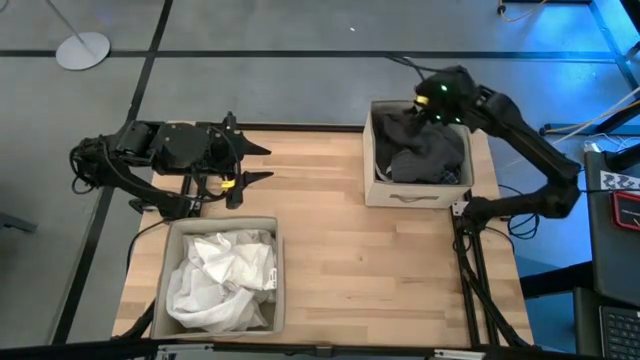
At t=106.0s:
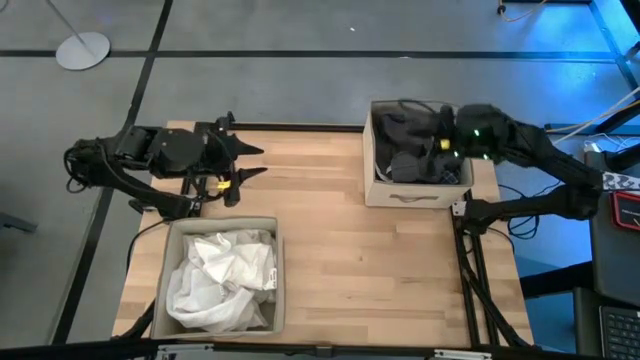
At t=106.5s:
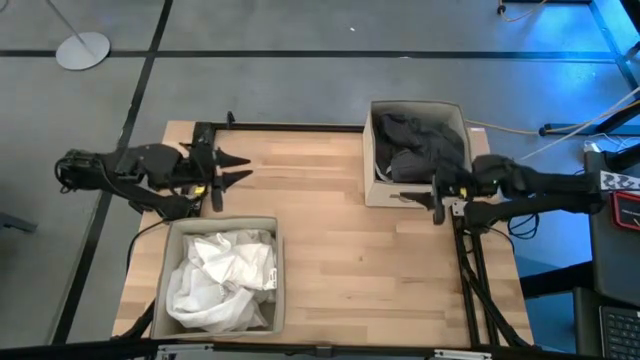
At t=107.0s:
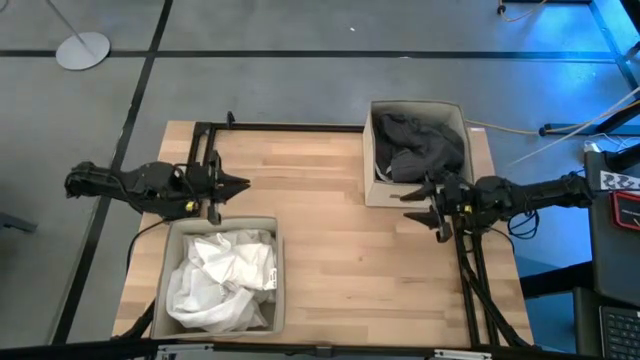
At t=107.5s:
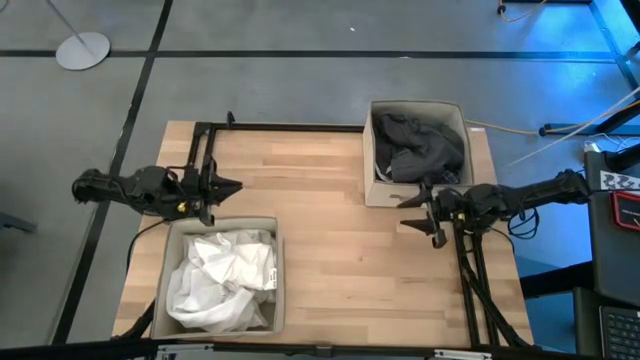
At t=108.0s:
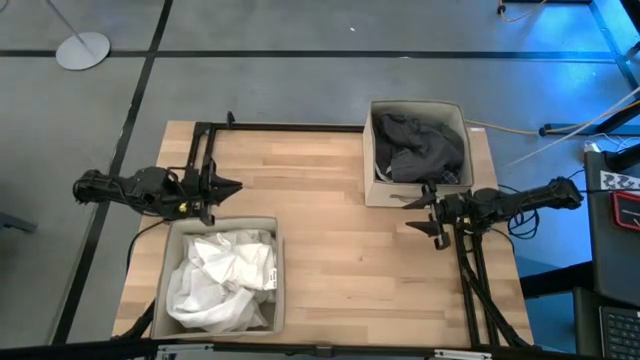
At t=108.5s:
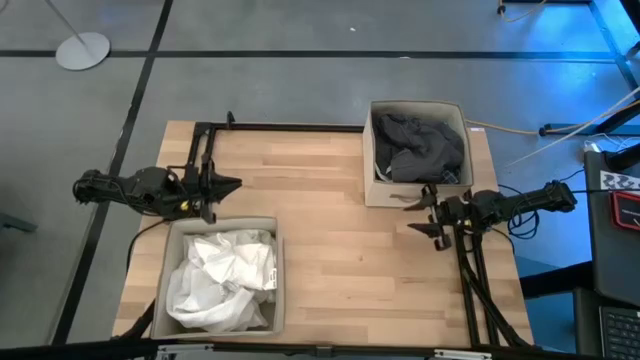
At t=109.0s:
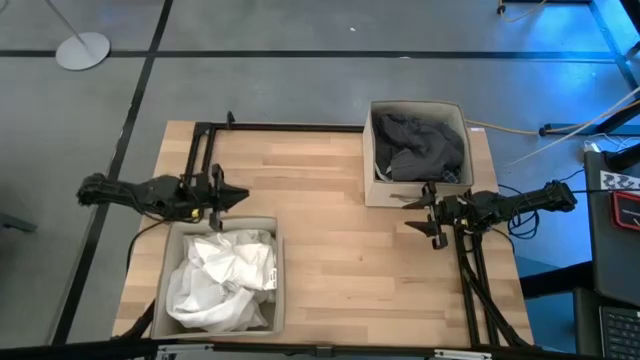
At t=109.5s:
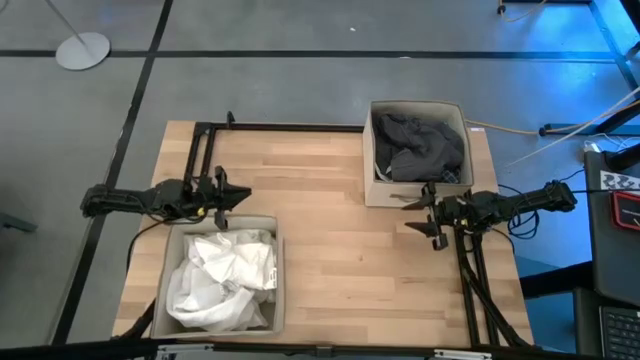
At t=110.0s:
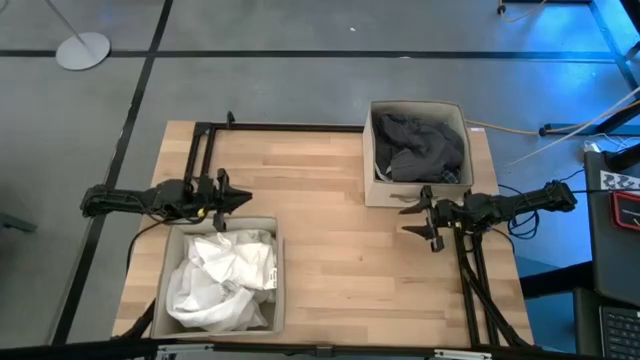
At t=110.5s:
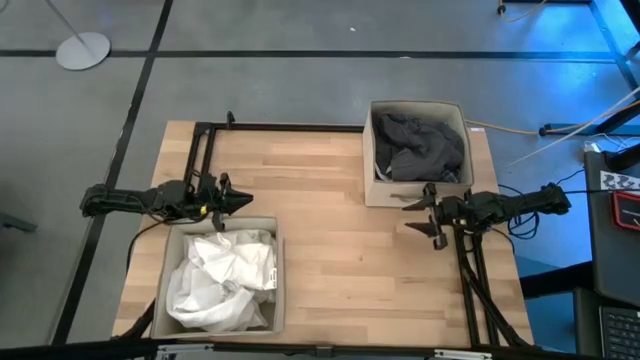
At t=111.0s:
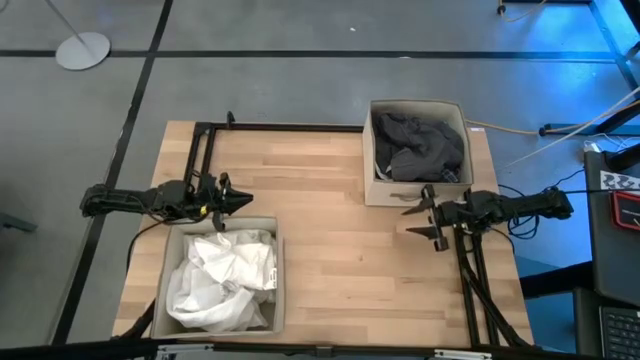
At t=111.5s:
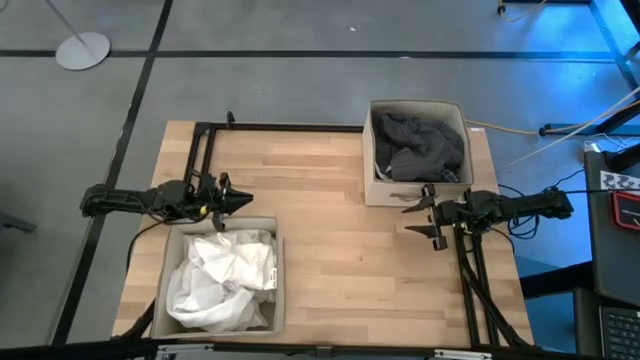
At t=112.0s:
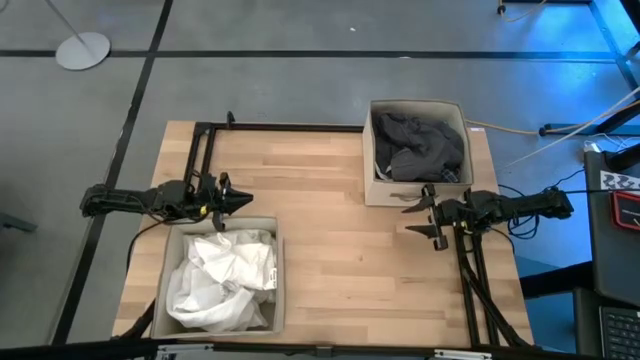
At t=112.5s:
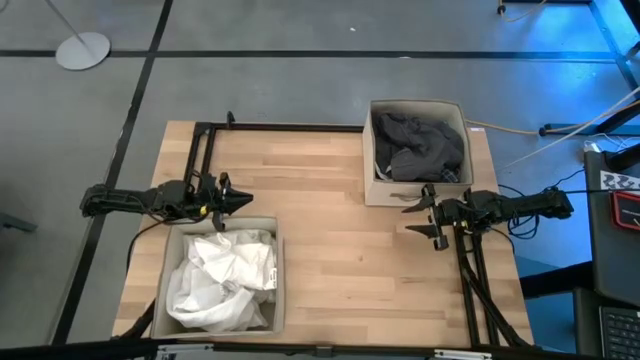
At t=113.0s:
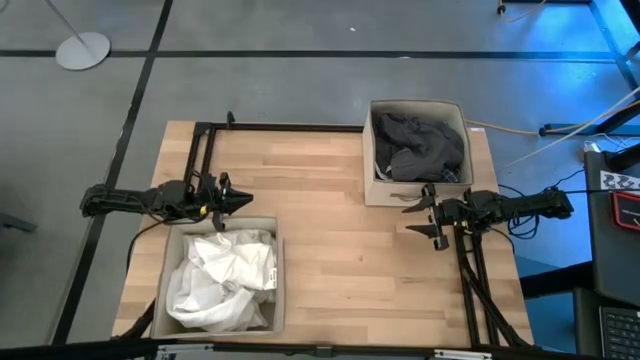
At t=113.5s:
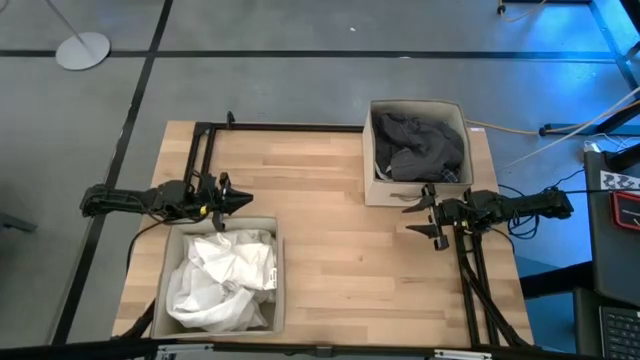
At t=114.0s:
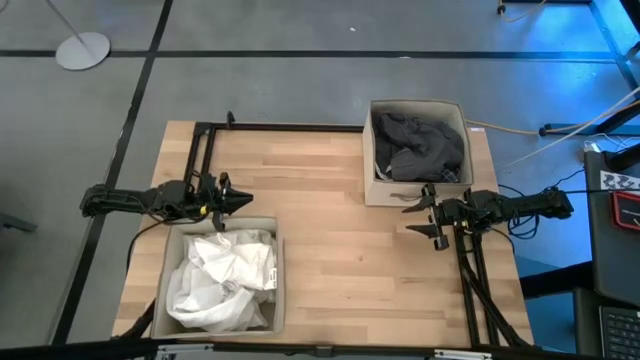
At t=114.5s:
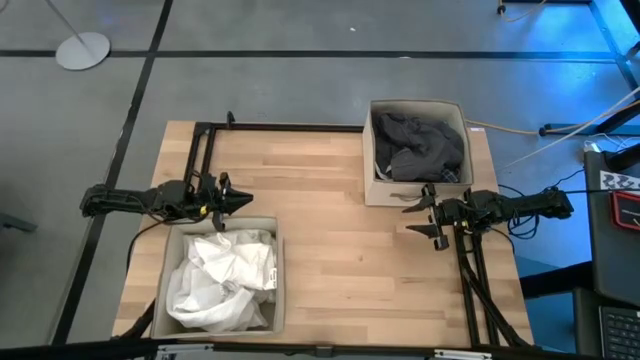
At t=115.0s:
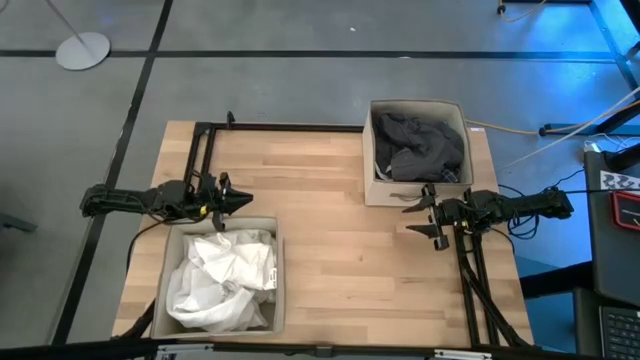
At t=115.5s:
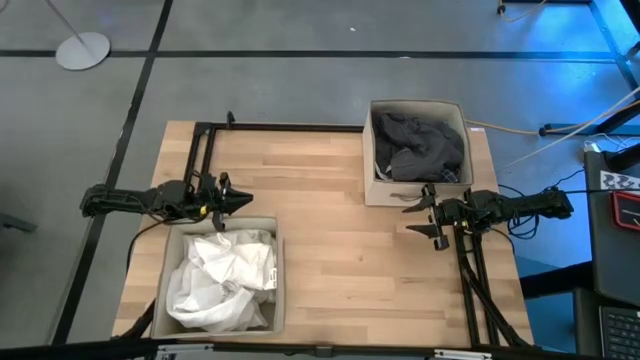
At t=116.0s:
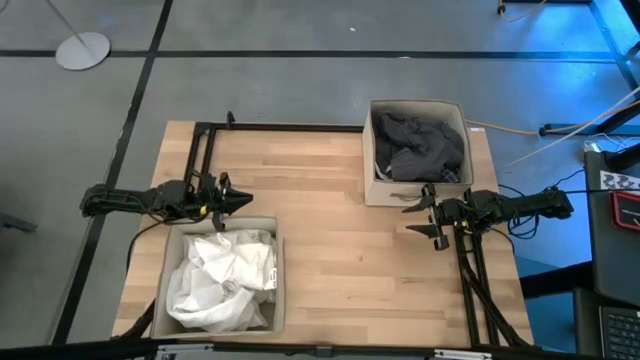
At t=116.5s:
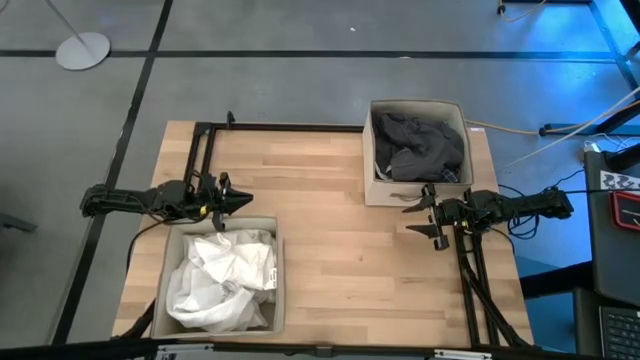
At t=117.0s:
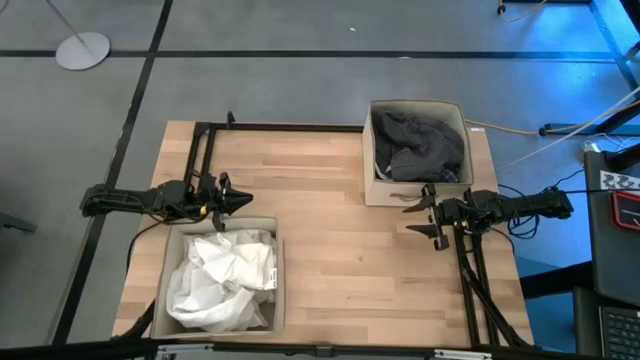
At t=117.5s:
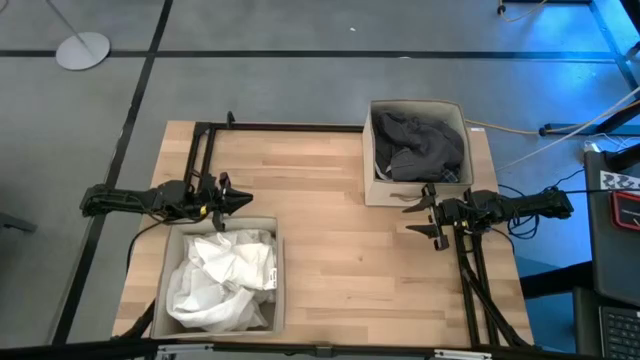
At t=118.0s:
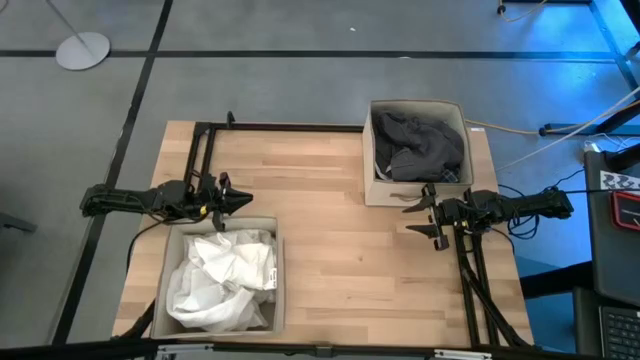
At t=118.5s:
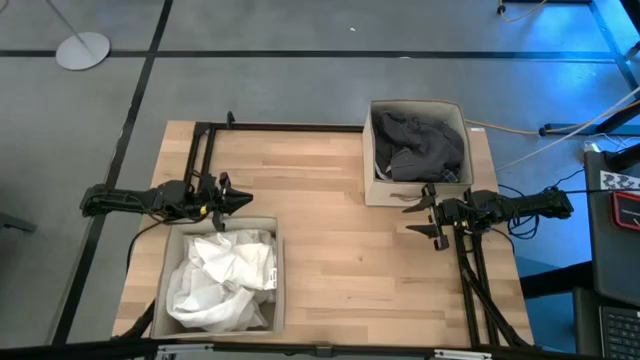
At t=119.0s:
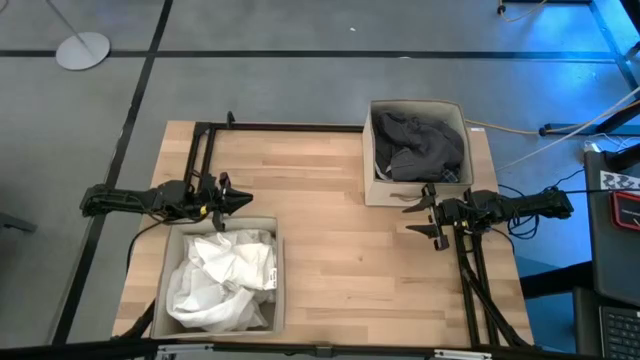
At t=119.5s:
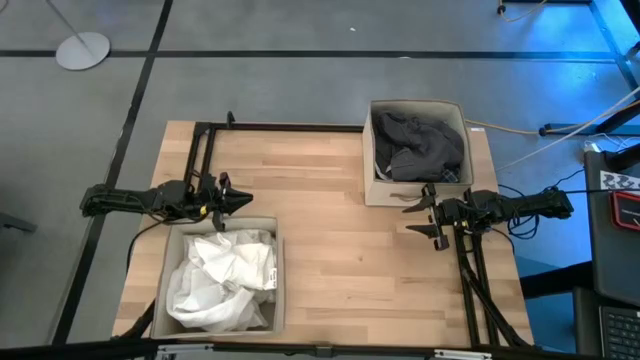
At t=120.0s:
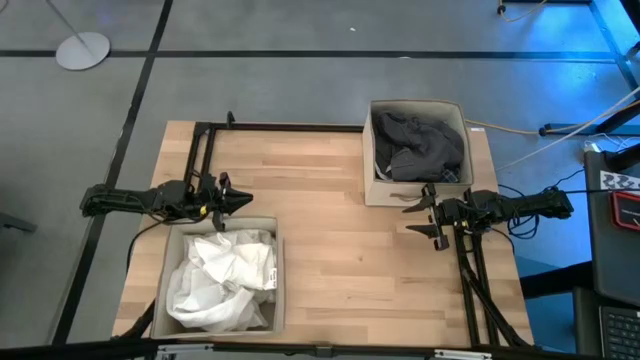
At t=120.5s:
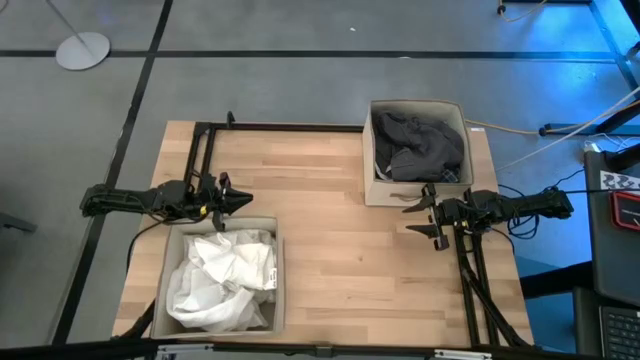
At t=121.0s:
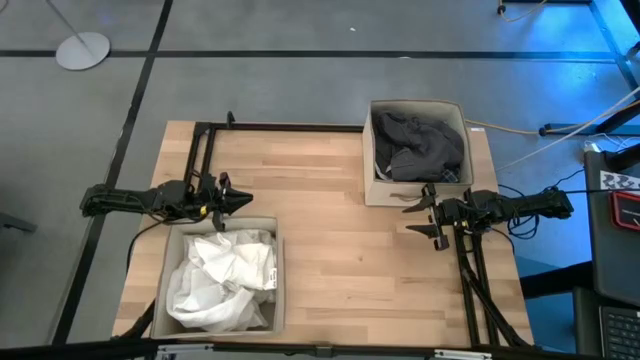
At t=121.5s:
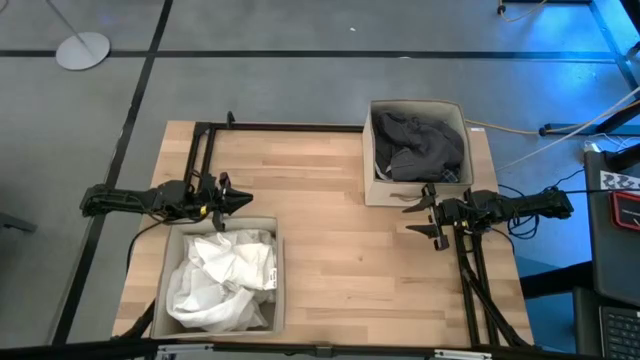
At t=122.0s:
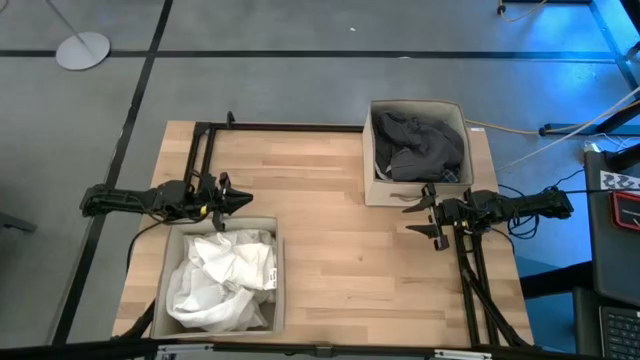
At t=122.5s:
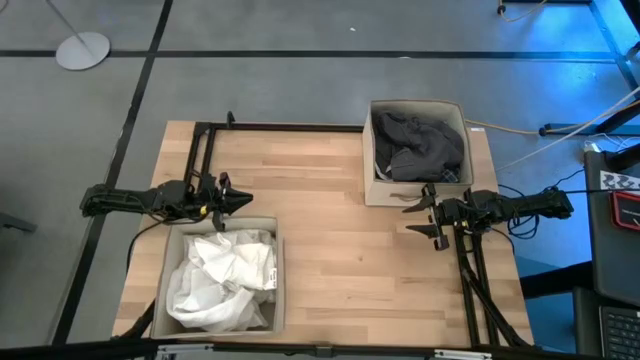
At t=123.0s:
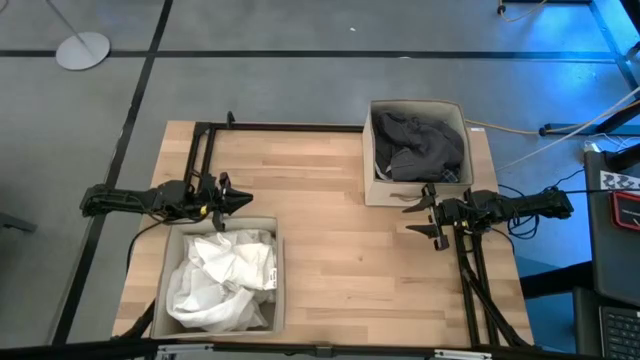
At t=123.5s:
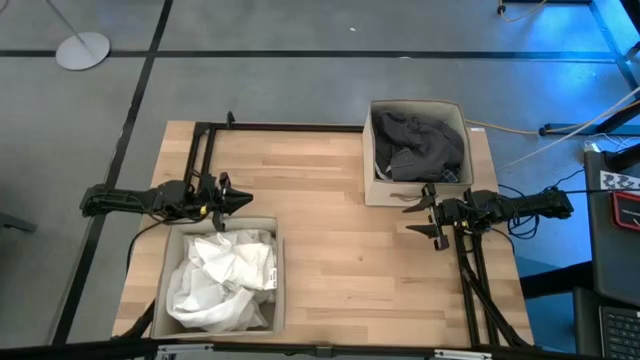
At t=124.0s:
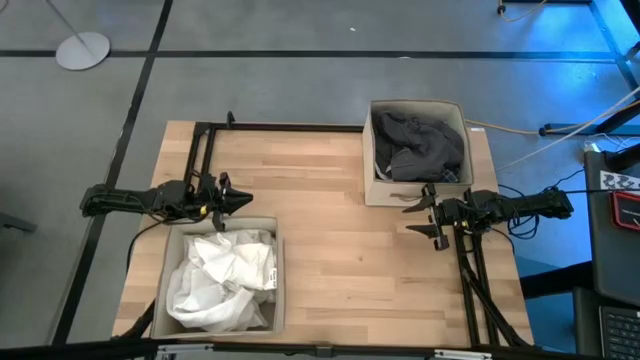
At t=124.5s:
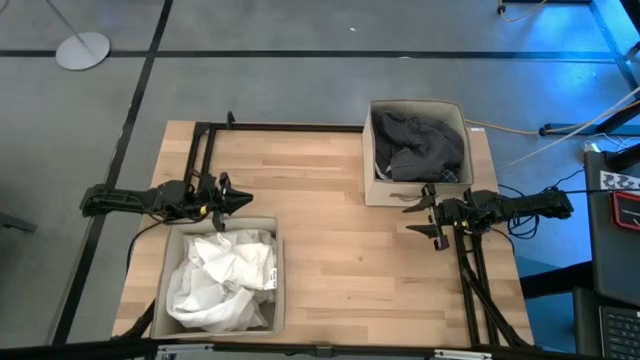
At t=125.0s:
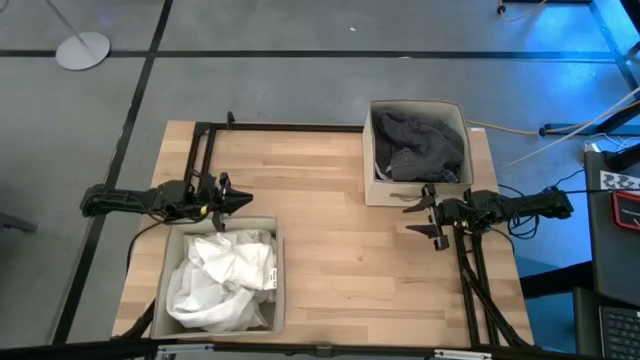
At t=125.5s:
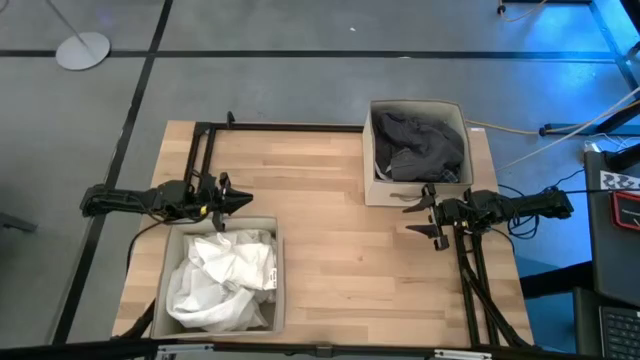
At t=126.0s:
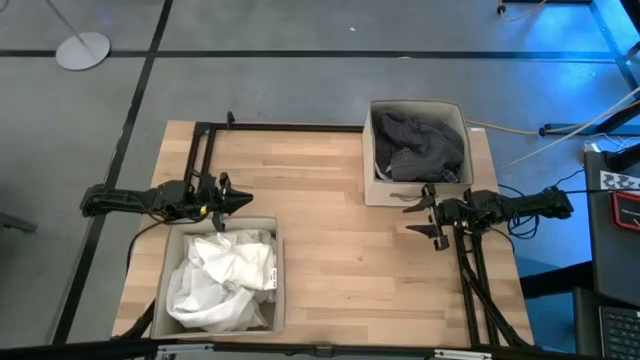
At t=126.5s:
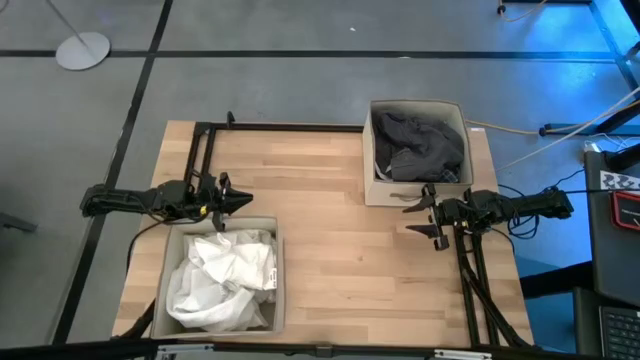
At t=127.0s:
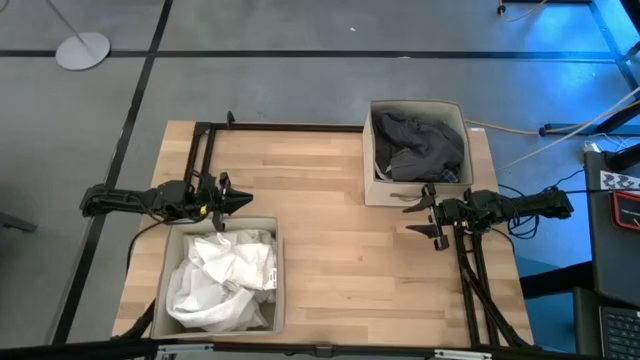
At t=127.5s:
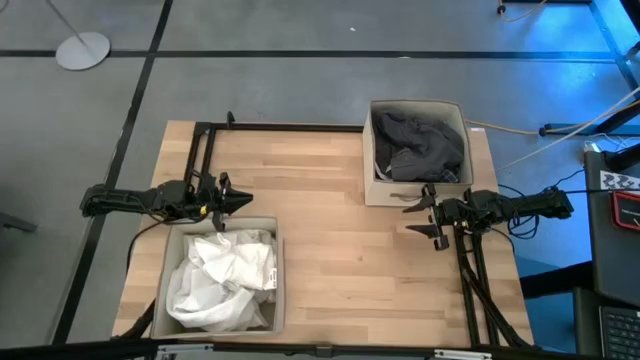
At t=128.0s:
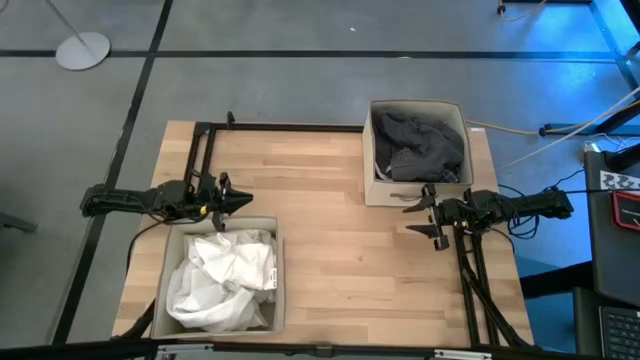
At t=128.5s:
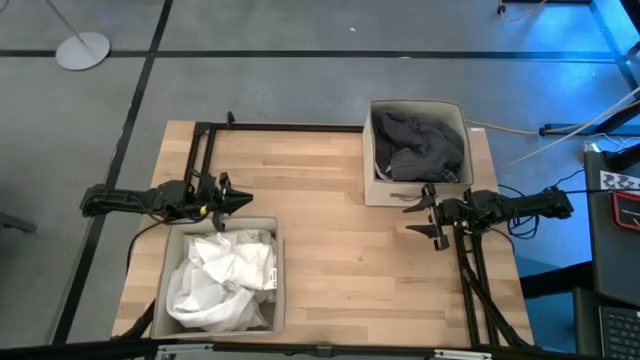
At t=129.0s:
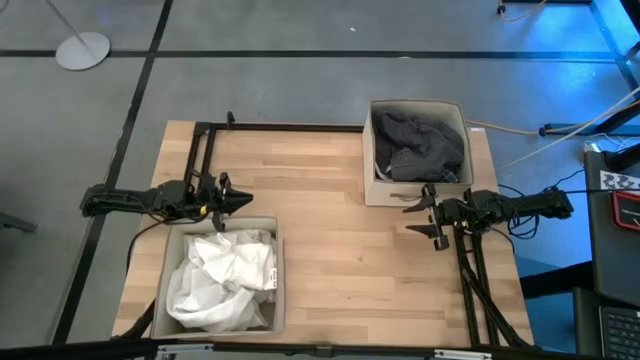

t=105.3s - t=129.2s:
Task: Sort clothes
Return to Home Position
